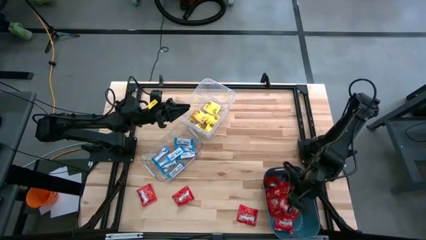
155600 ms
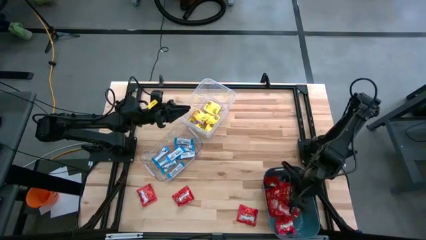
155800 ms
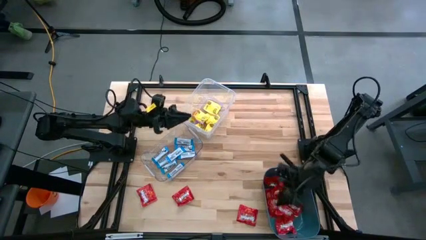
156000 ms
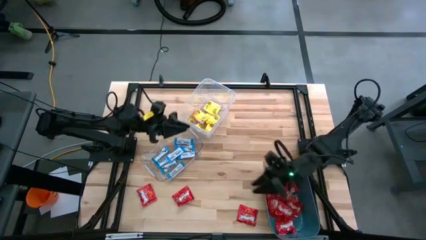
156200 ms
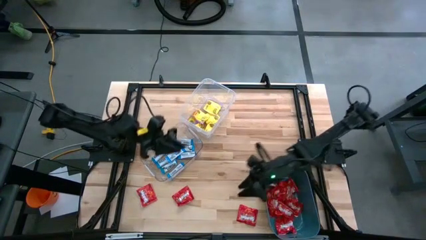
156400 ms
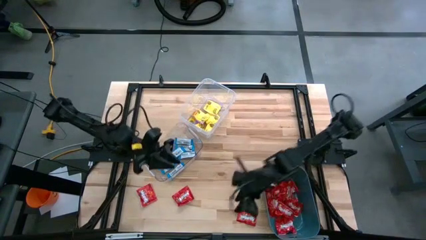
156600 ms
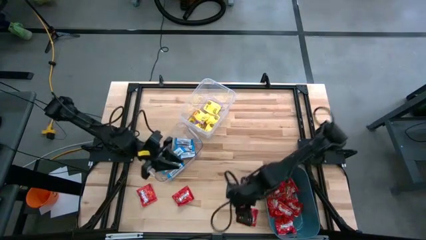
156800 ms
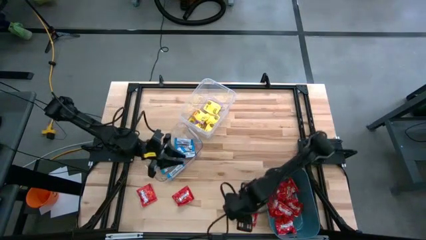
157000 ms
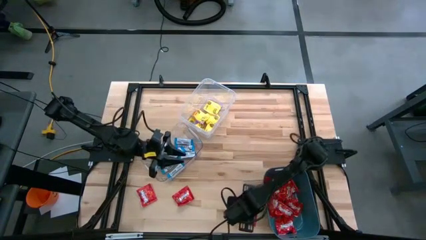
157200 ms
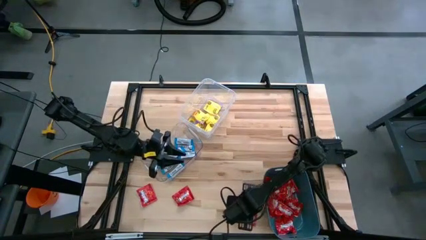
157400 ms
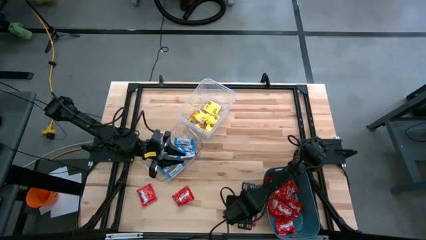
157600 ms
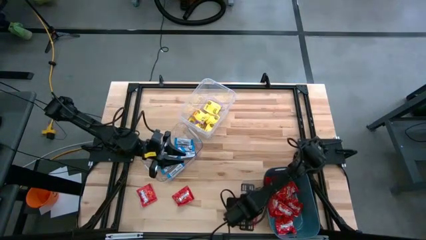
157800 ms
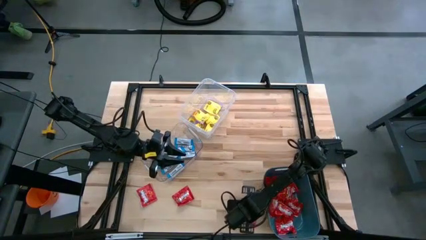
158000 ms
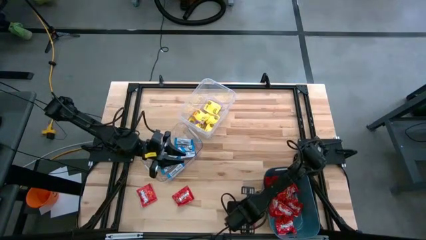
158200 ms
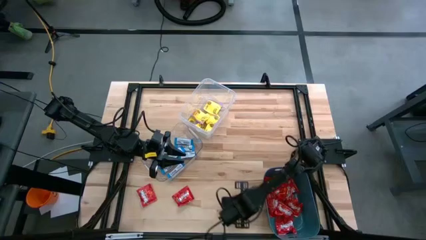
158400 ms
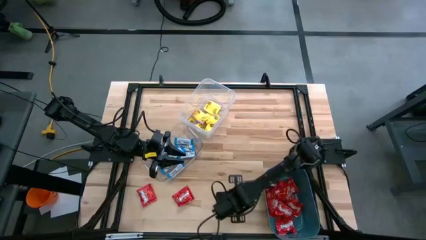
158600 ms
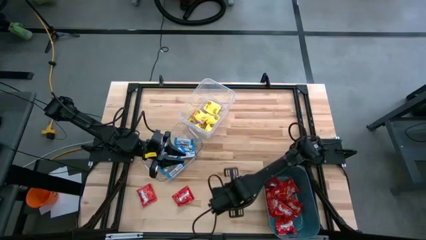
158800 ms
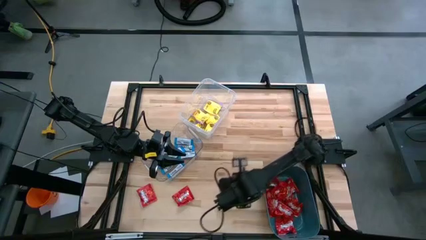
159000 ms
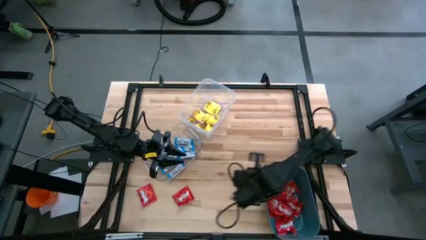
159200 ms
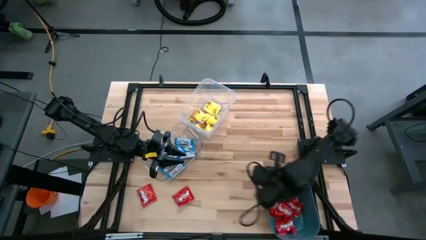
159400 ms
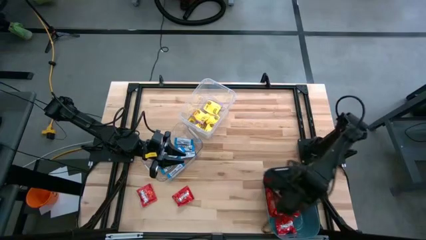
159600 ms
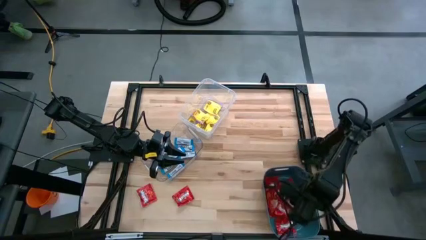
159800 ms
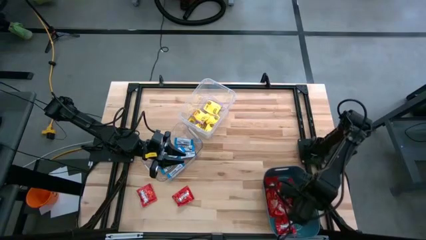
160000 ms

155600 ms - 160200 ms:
Task: Sort candy
Put the red candy into the blue bin

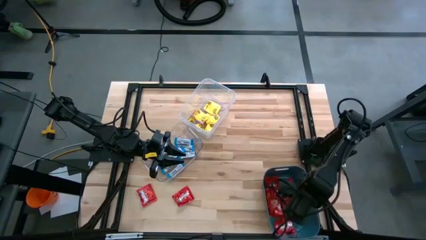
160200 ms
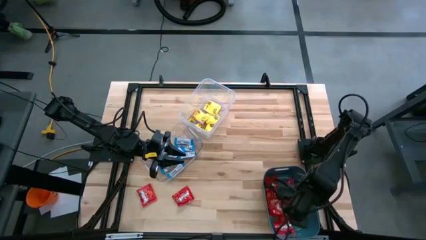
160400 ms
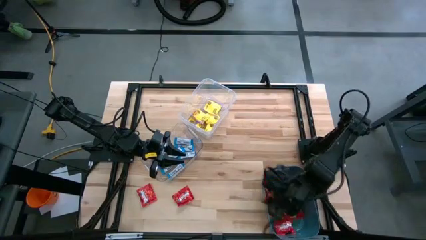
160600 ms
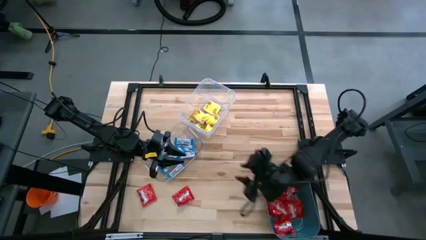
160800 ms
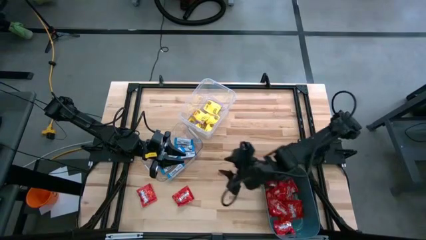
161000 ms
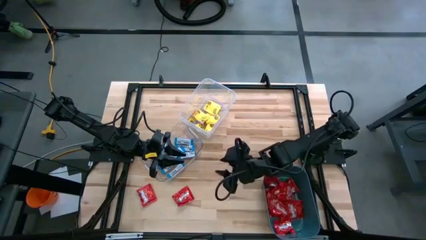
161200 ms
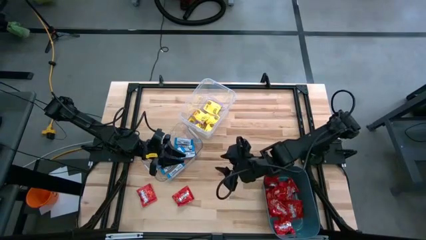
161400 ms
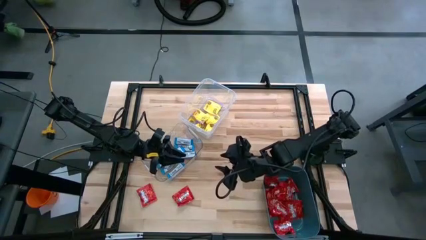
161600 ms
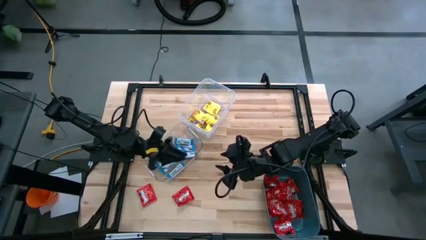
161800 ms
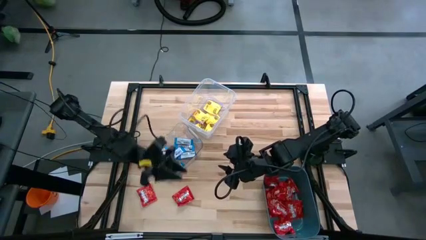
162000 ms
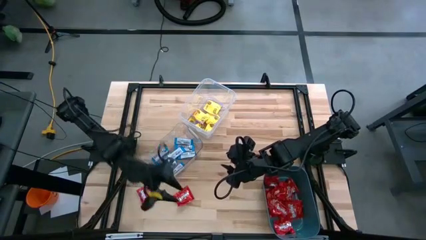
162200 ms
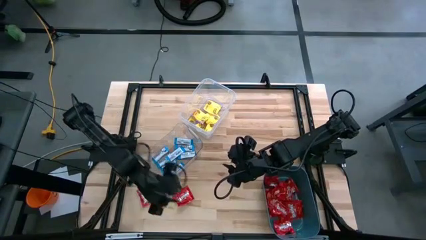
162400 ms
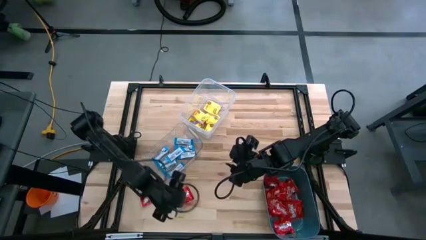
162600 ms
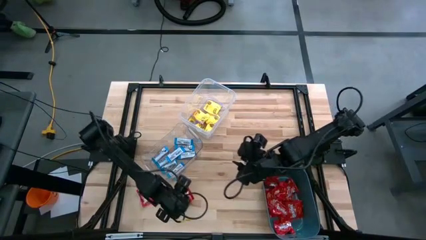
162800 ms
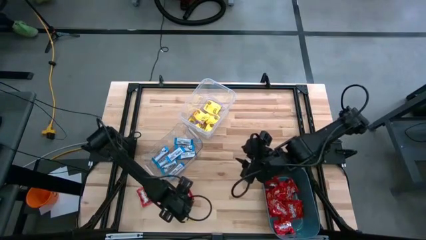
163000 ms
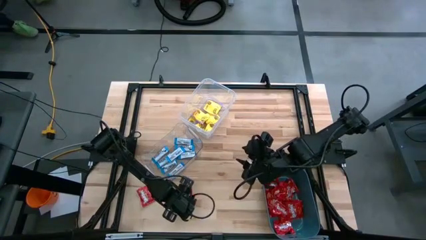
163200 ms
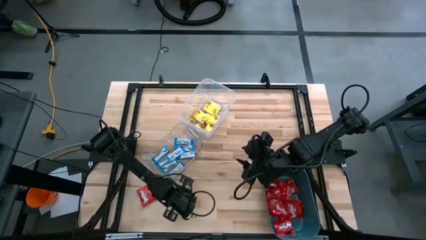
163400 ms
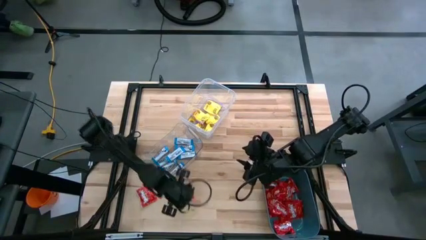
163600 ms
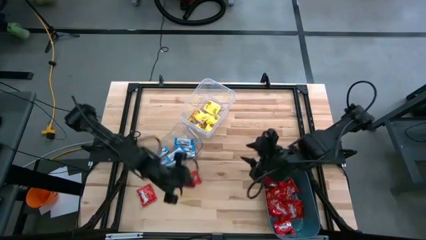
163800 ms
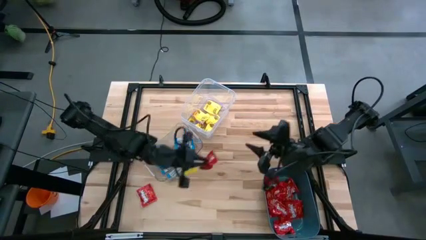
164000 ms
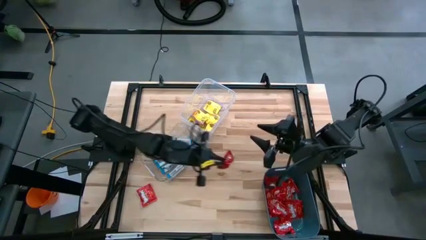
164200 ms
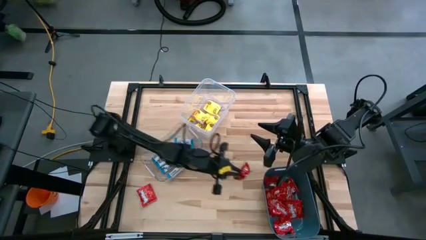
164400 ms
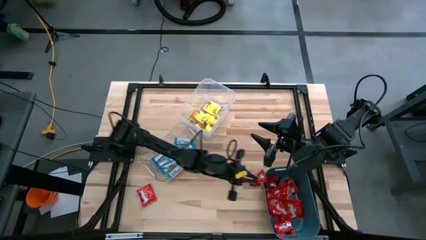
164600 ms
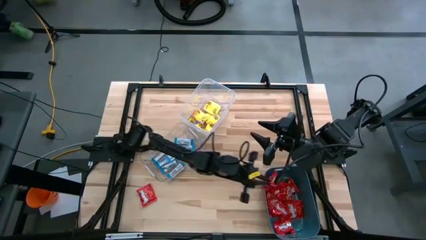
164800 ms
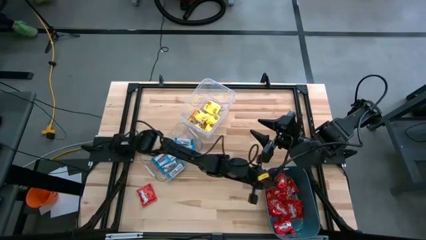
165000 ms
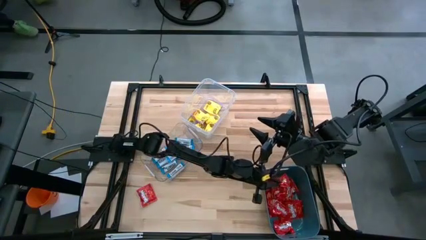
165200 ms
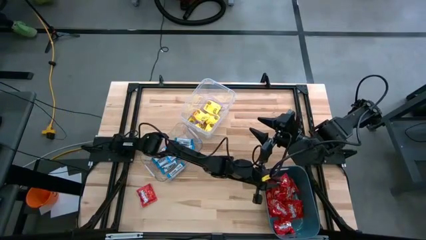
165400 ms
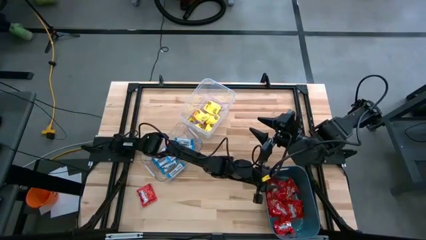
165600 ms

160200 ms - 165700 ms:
Put the red candy into the blue bin

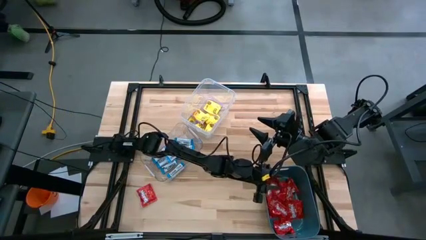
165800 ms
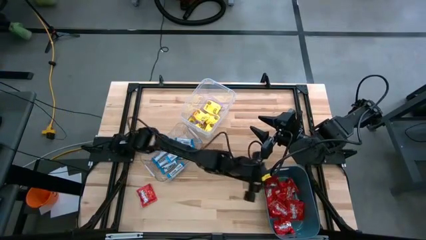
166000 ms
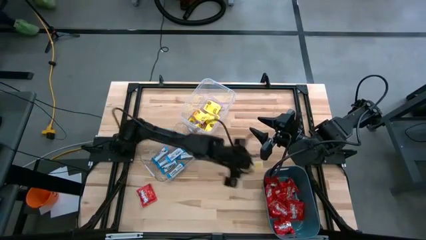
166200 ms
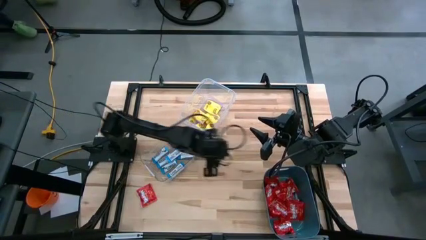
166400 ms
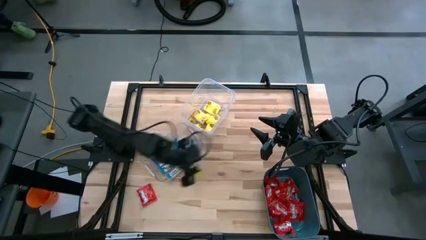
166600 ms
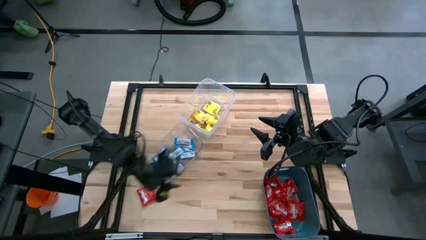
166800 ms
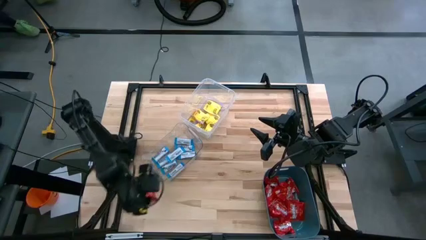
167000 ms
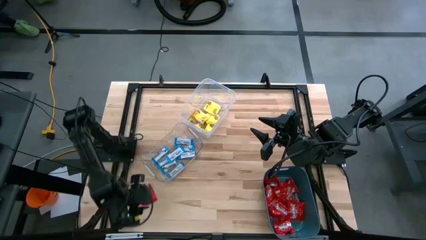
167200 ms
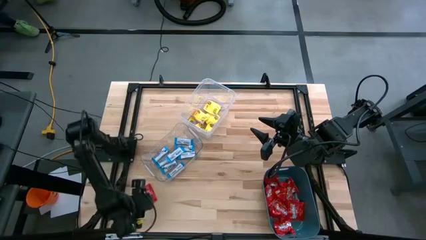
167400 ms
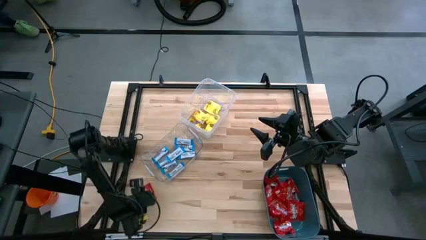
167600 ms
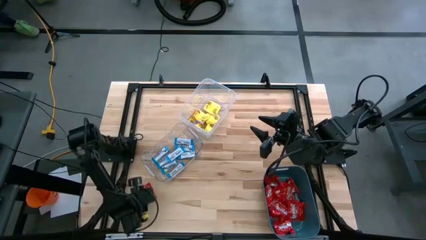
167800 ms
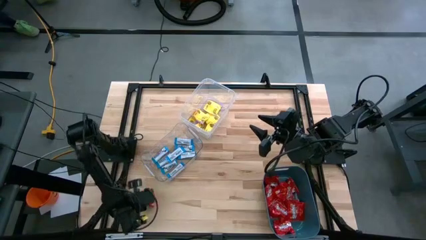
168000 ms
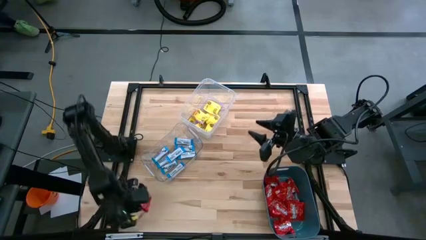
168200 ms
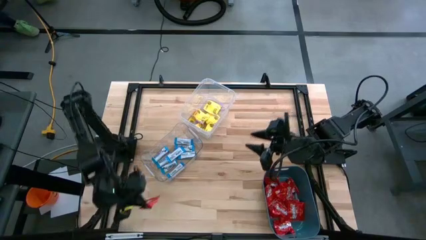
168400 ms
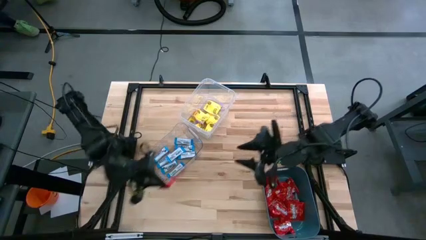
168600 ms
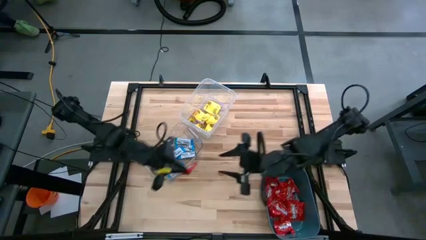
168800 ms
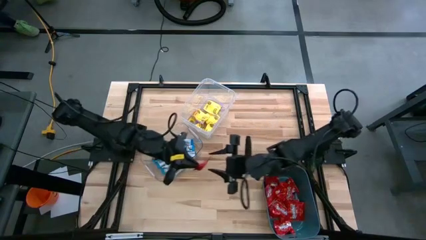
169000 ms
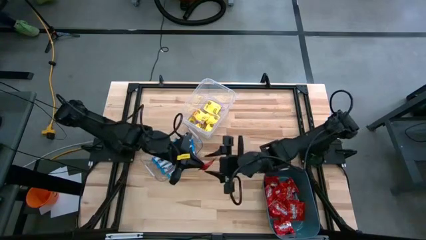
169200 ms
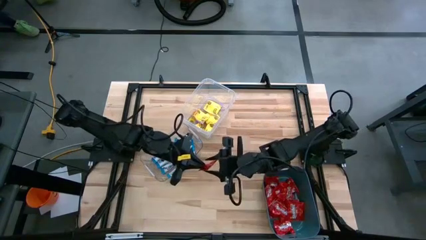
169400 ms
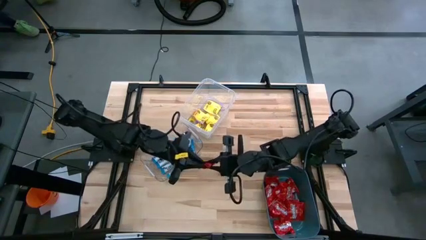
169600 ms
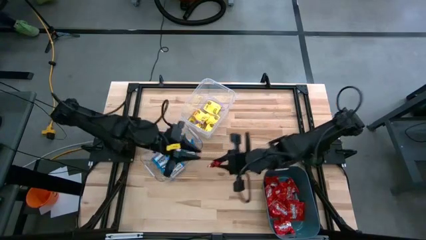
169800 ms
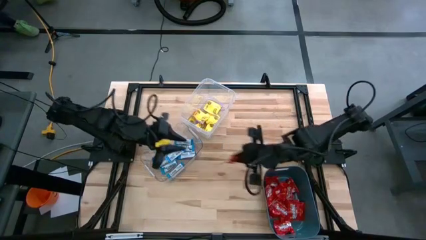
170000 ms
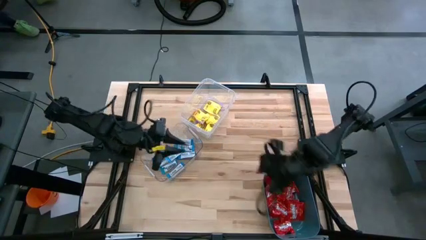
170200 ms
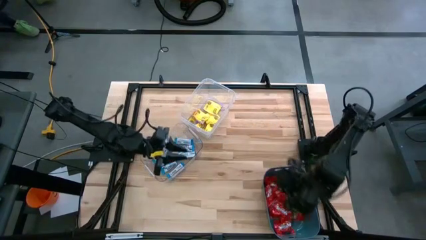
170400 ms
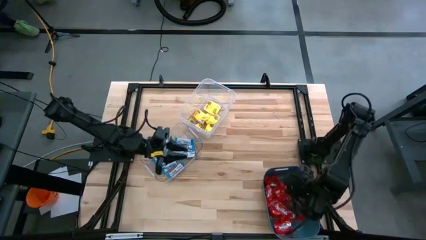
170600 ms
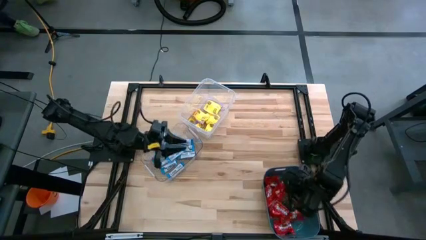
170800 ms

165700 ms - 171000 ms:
Put the red candy into the blue bin

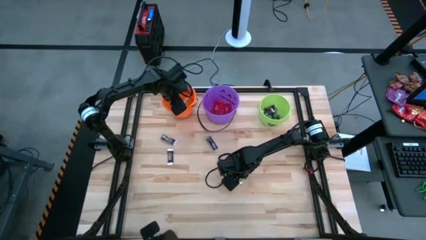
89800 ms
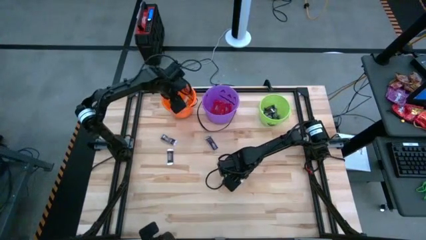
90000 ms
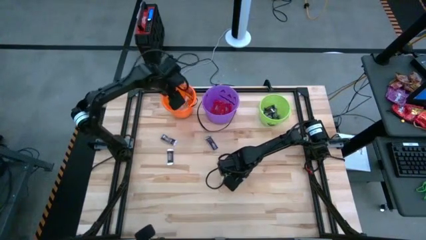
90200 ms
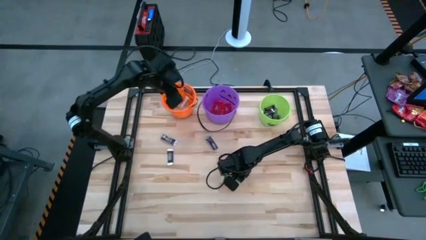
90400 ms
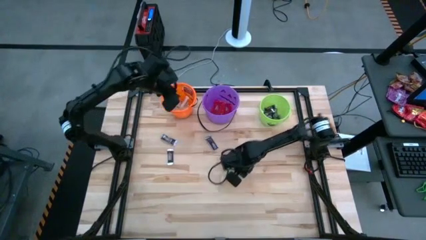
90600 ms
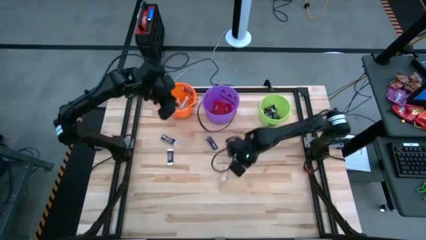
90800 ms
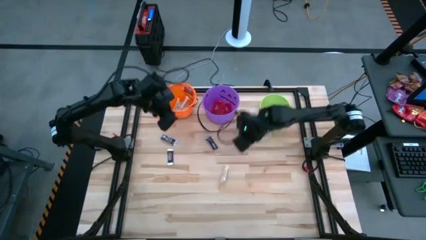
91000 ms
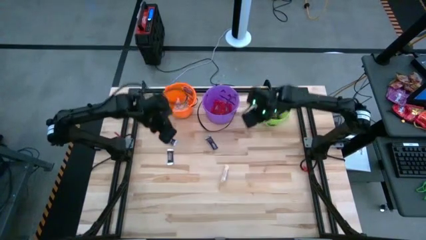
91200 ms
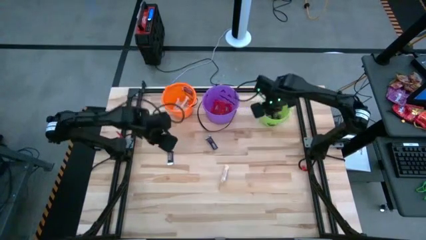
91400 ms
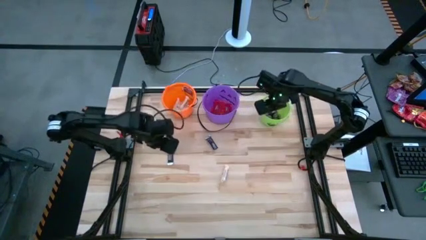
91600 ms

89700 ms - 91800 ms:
Task: Sort candy by brand, put in halloween buckets
Put the brown chocolate bar into the green bucket
